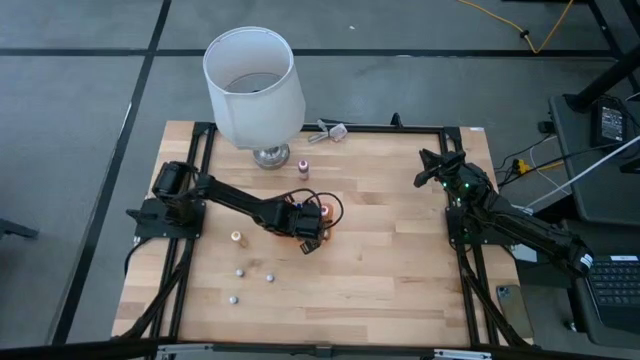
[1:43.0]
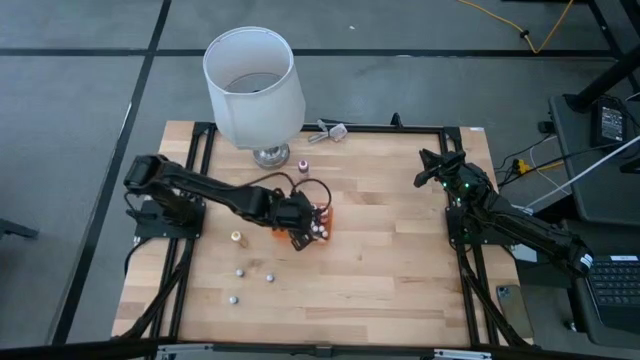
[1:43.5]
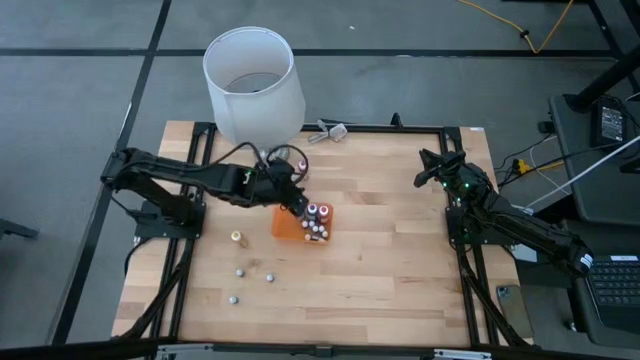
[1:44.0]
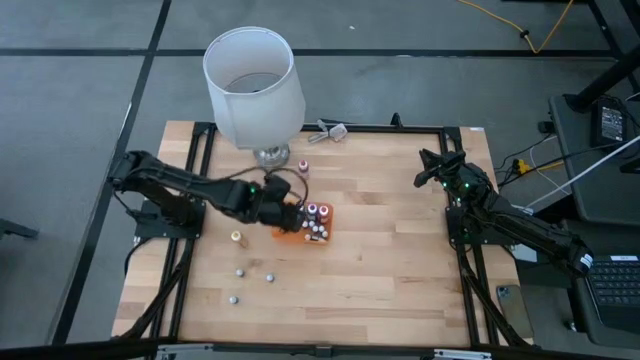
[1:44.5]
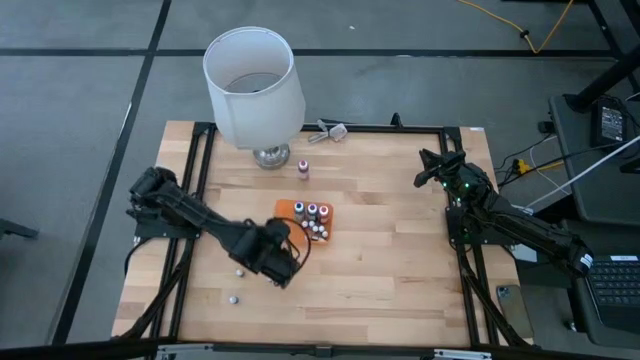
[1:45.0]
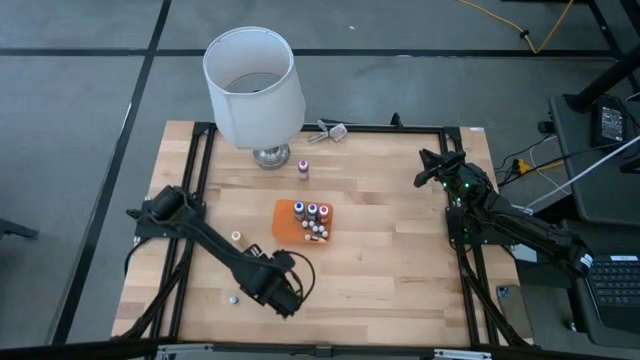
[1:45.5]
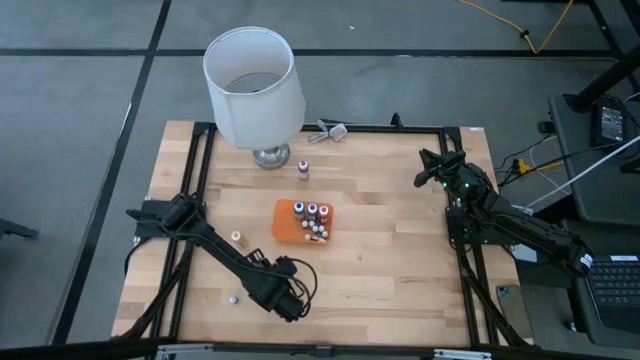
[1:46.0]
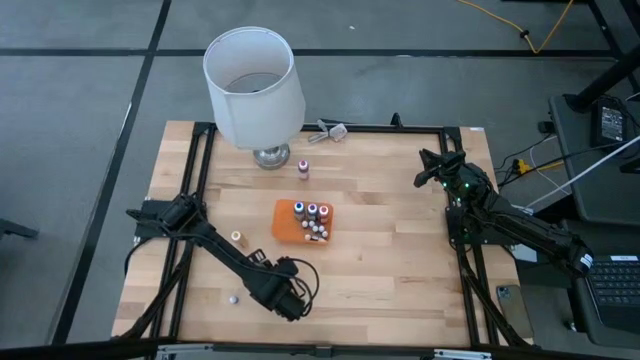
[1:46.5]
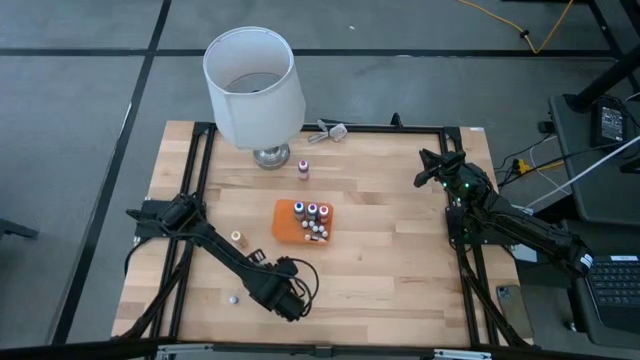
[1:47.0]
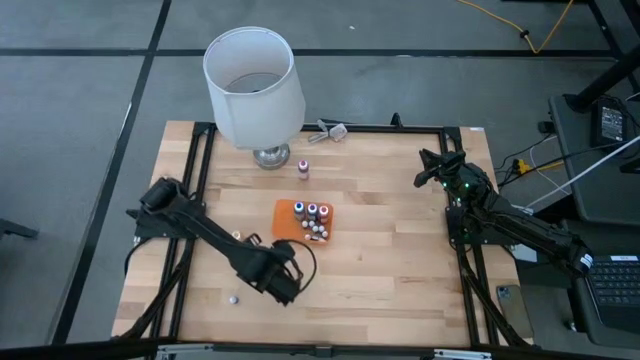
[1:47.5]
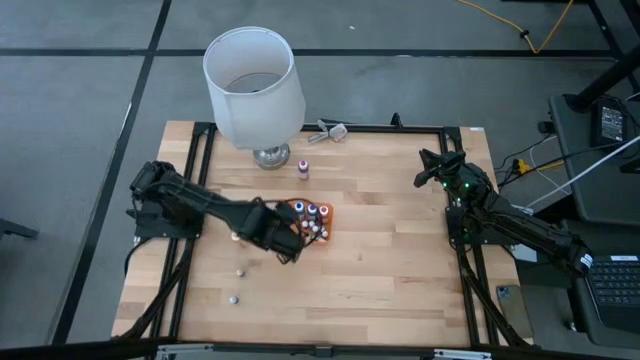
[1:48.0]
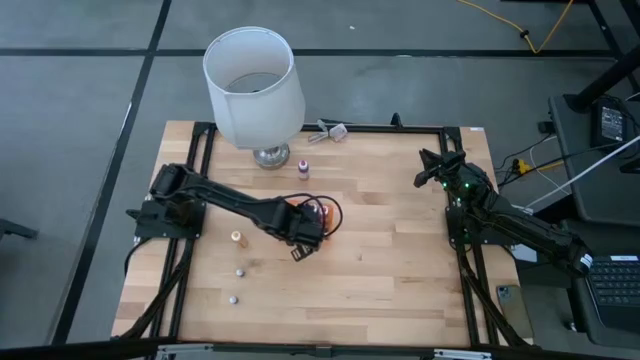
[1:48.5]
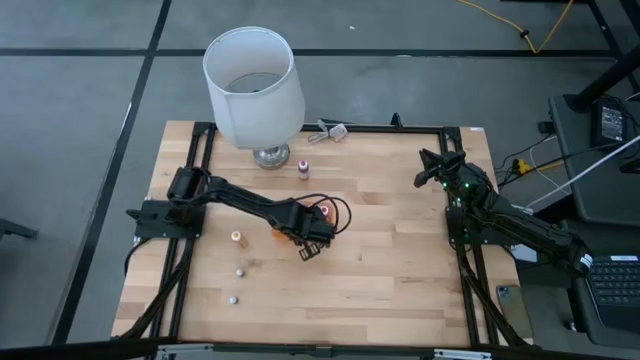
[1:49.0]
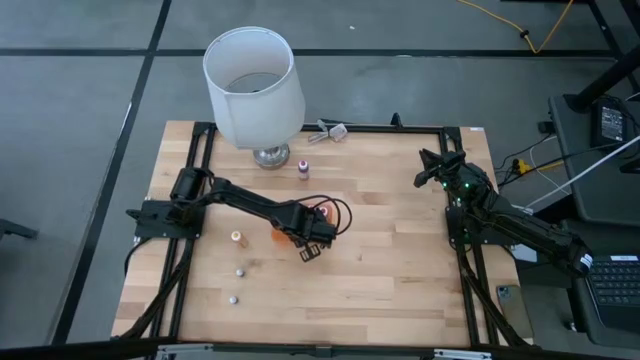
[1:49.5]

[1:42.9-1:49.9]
Task: Pick & Place food coloring
Put the small blue food coloring bottle into the orange bin

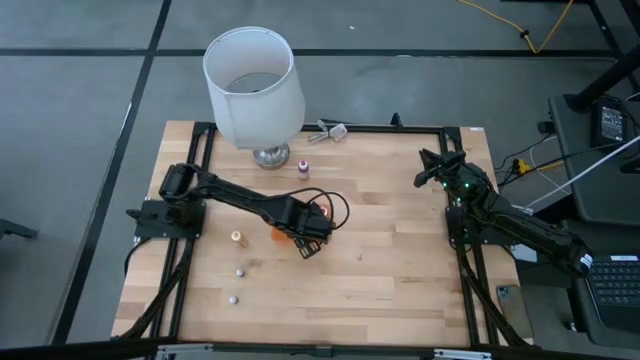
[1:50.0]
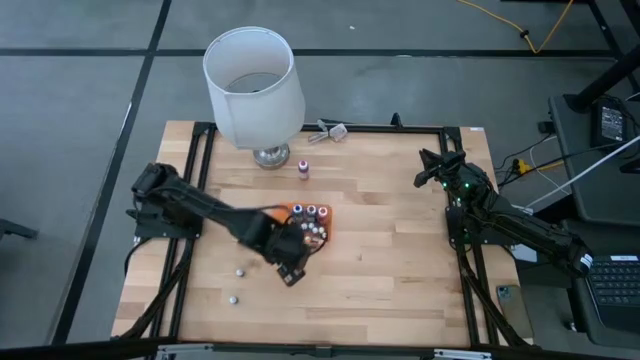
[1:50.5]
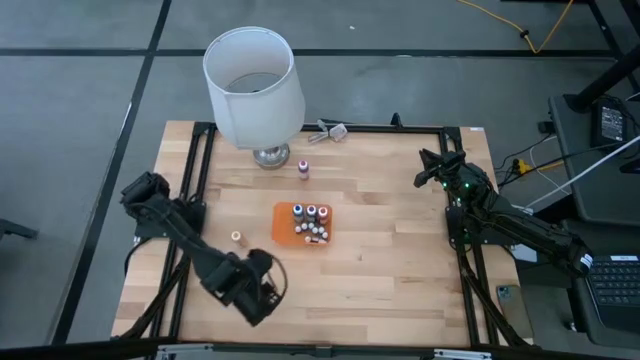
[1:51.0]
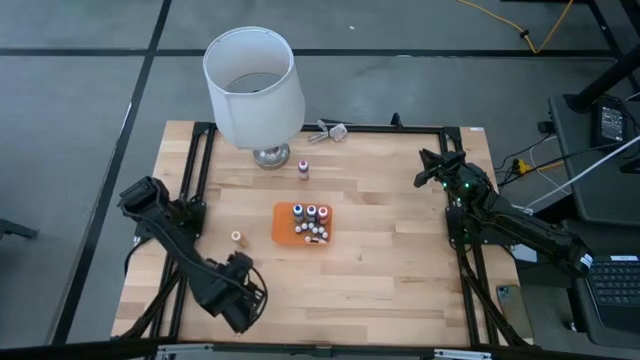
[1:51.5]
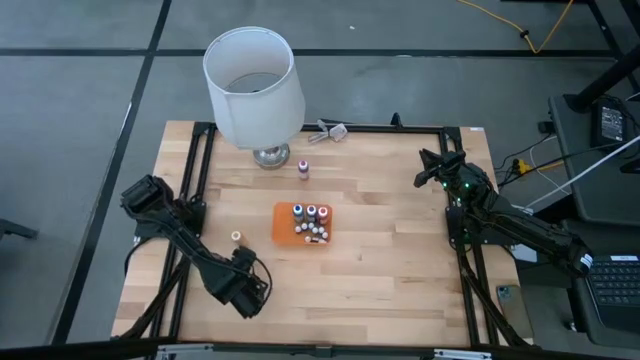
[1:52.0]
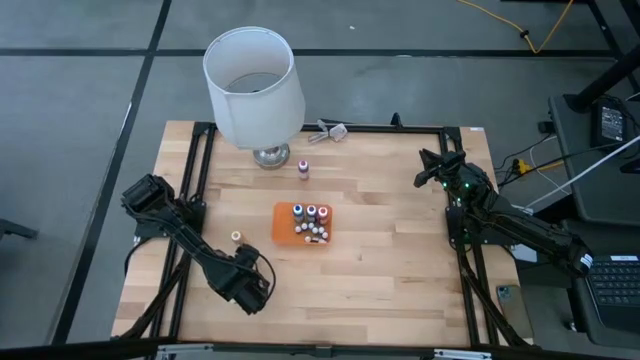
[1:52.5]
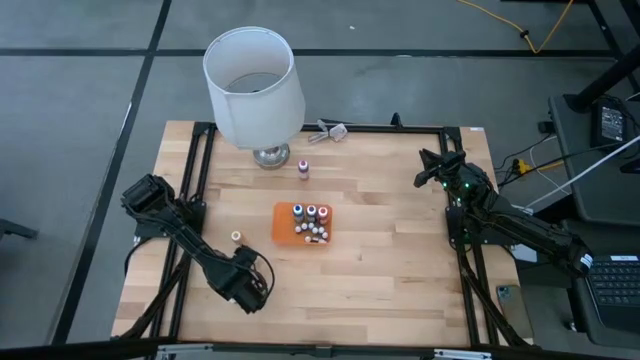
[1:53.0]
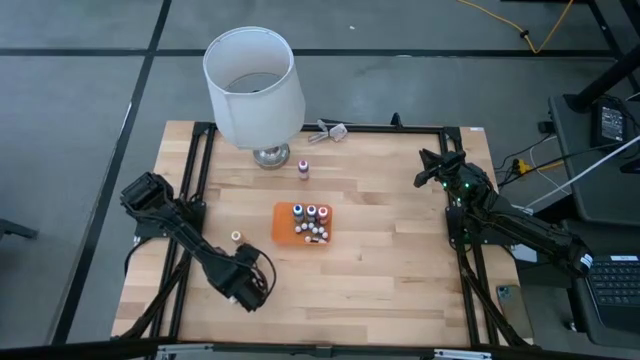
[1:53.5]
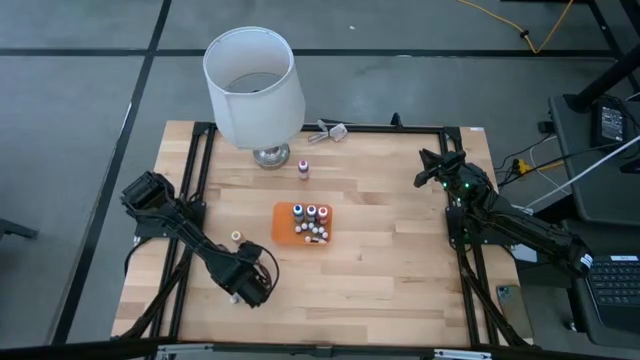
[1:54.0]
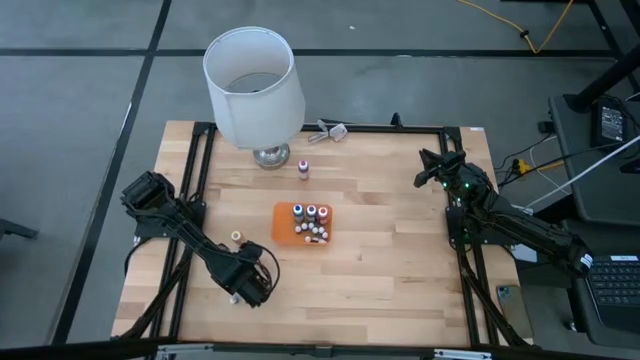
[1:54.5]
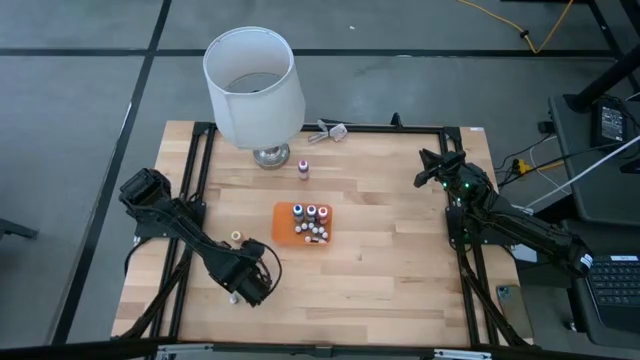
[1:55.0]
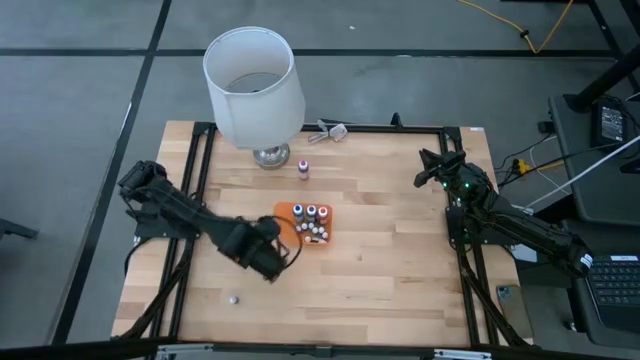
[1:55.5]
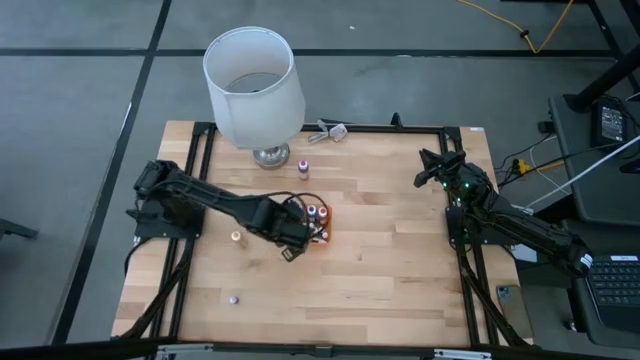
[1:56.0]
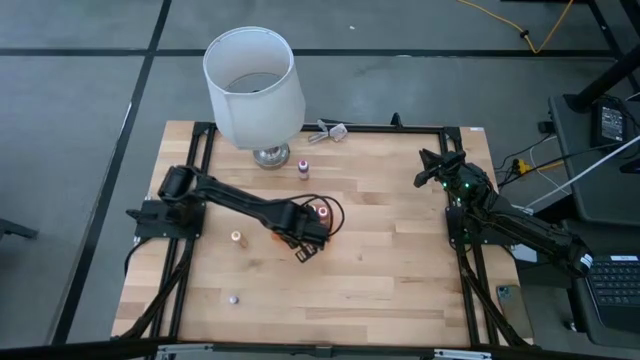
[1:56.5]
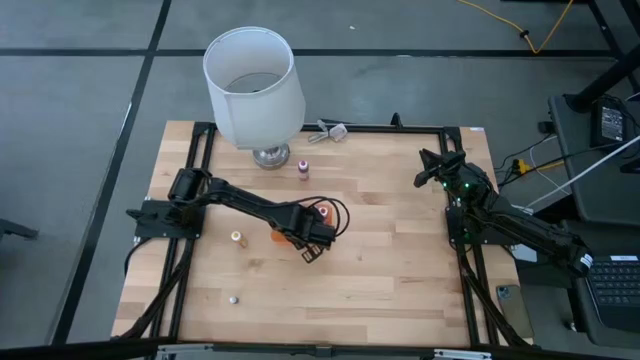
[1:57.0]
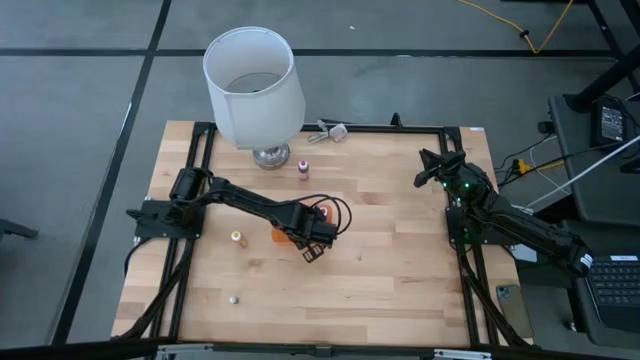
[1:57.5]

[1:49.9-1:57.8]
Put the small red food coloring bottle into the orange bin

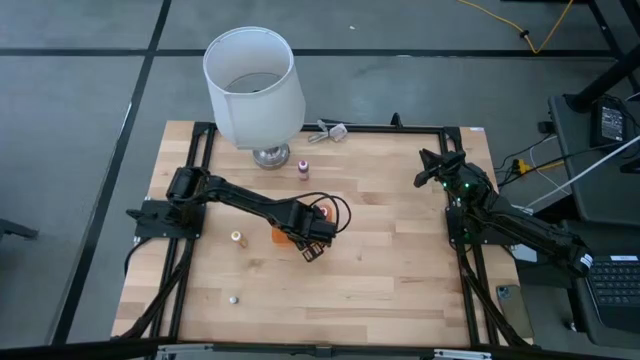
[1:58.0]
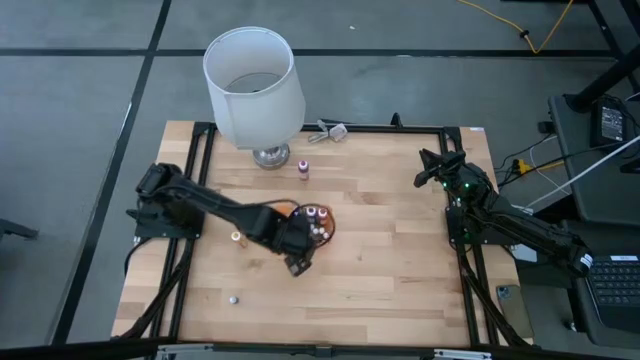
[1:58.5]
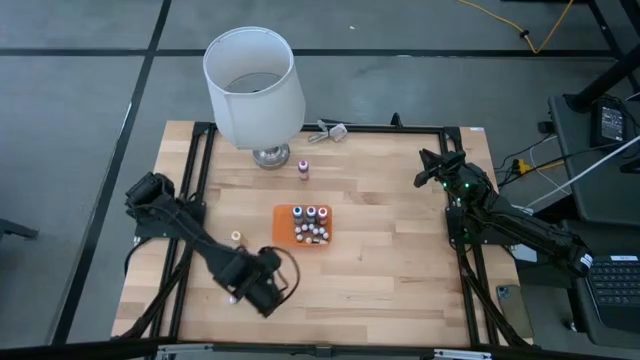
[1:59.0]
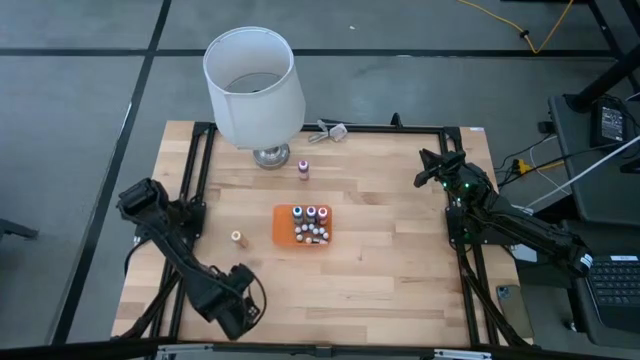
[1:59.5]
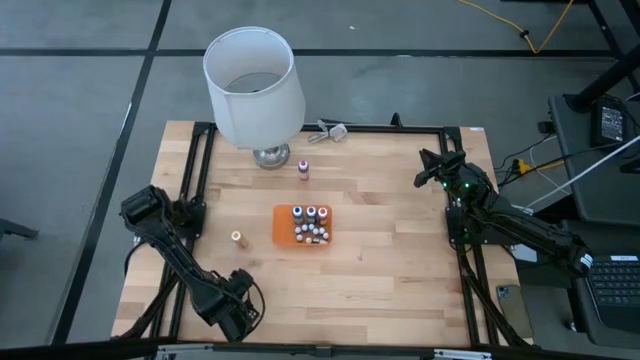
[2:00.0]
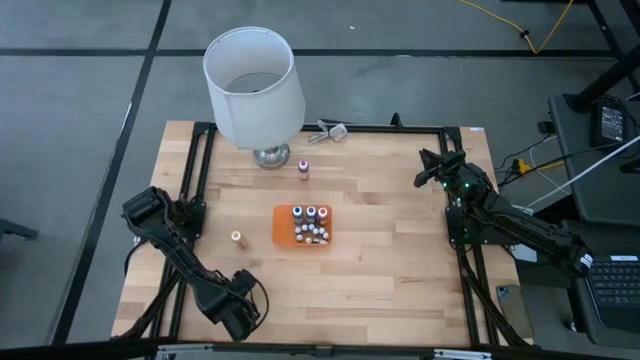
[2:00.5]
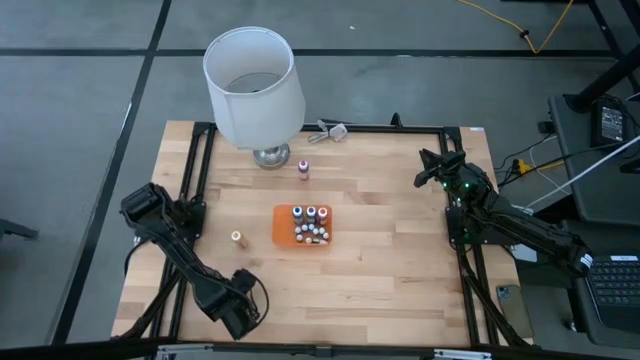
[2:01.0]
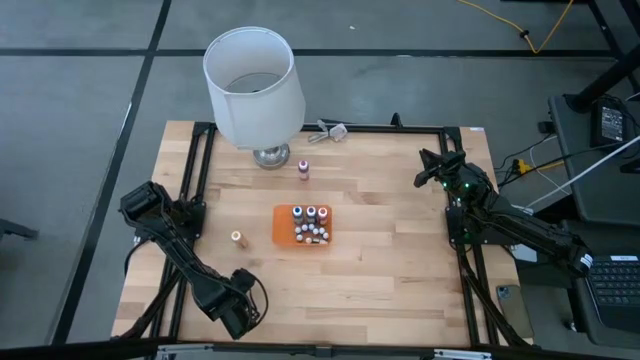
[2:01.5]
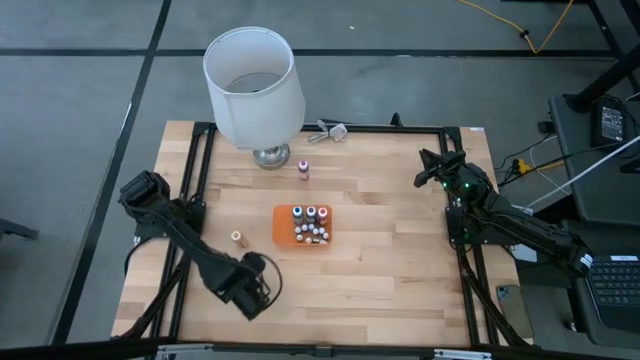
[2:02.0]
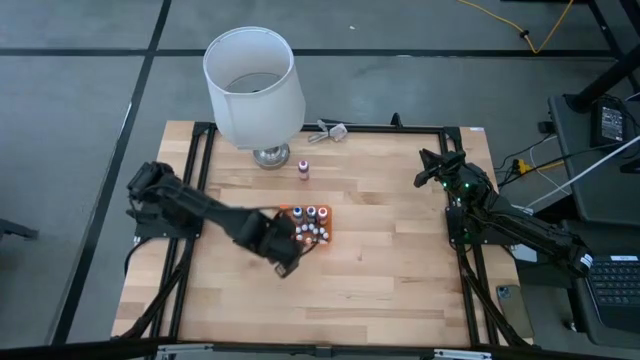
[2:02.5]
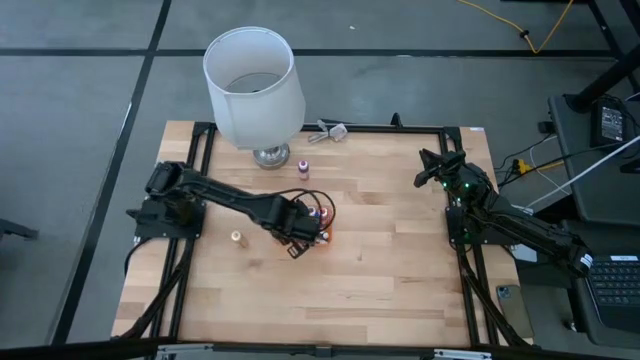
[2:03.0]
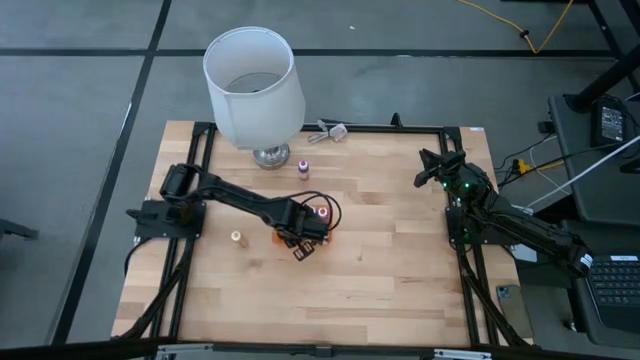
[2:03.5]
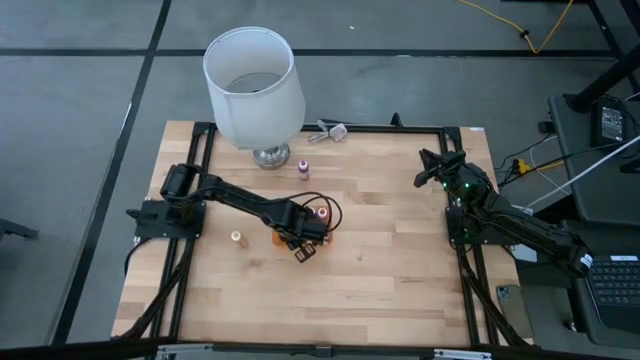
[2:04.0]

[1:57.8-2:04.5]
Put the small red food coloring bottle into the orange bin

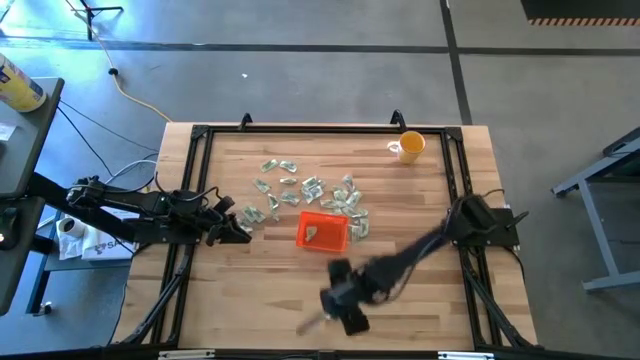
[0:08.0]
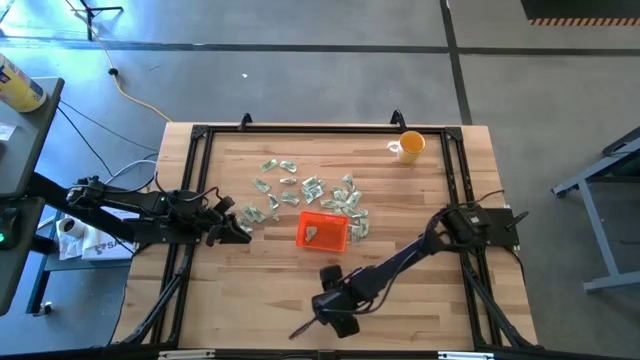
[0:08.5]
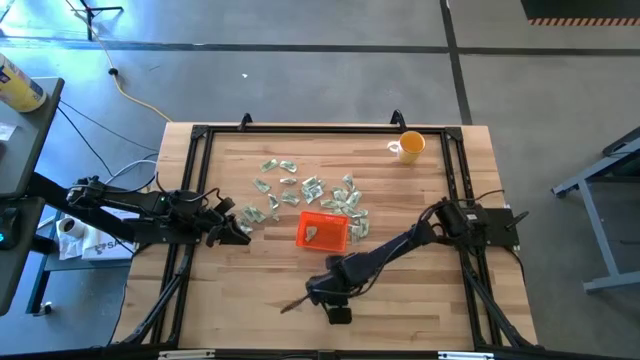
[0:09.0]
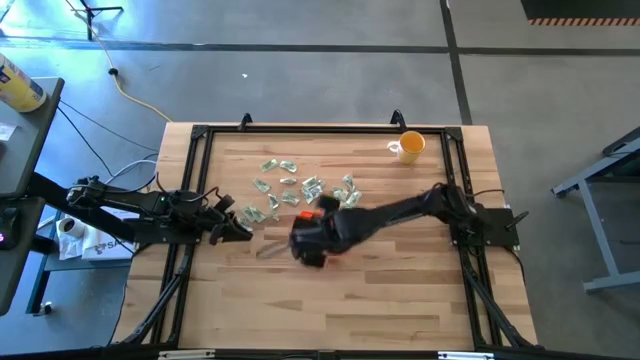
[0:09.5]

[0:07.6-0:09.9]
Task: Pick and place Stevia / Truvia into bins
Put the stevia packet into the orange bin
